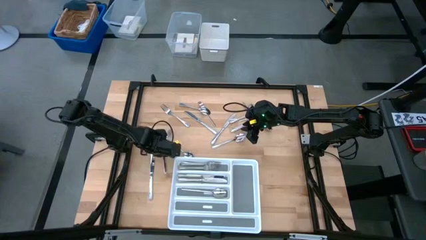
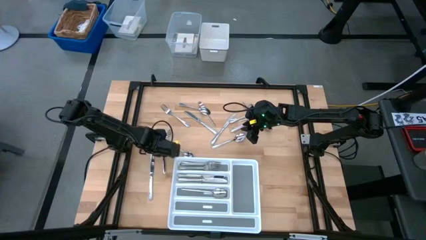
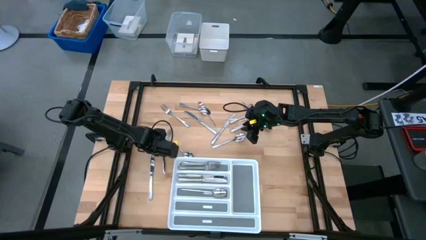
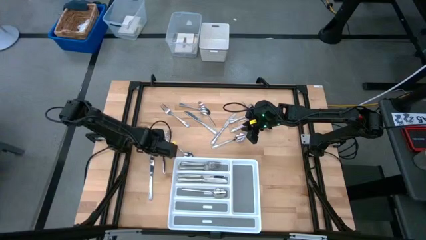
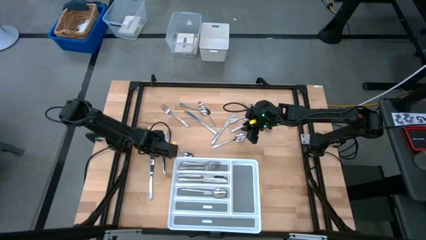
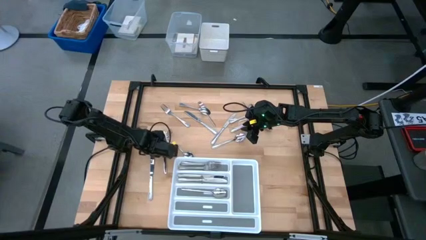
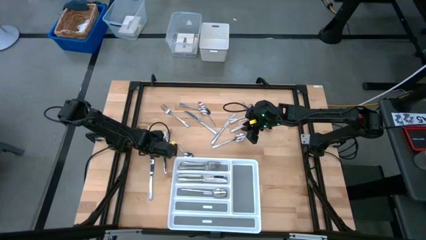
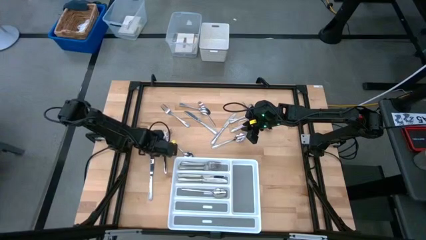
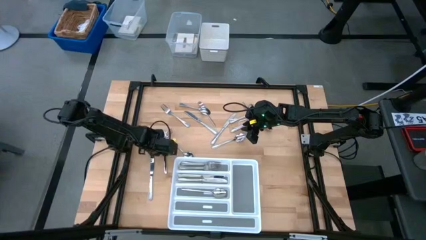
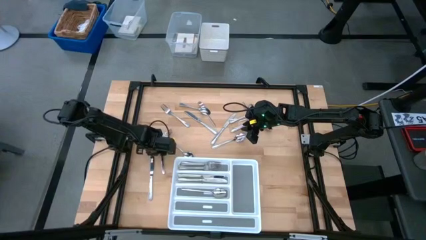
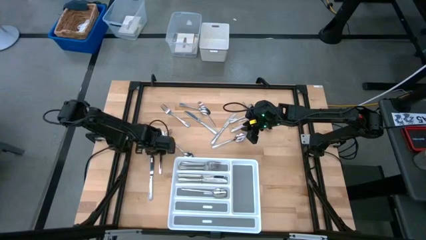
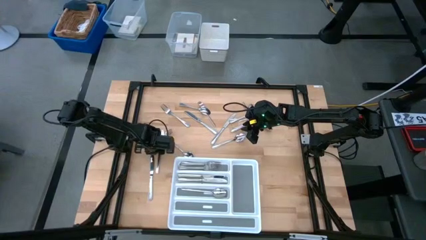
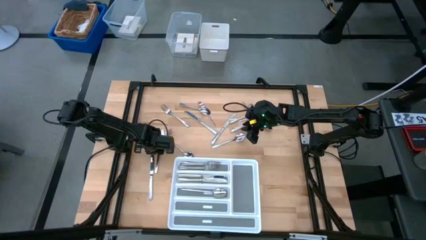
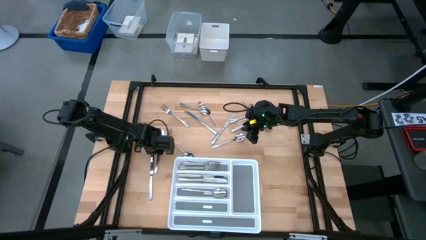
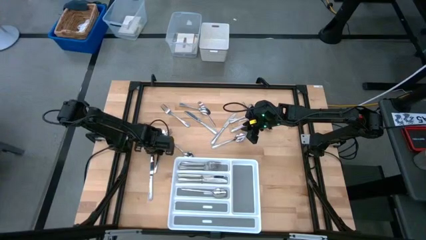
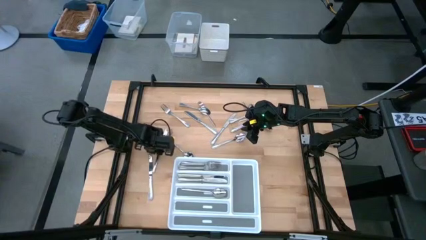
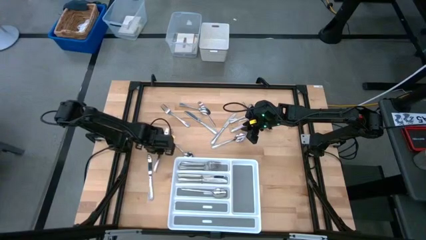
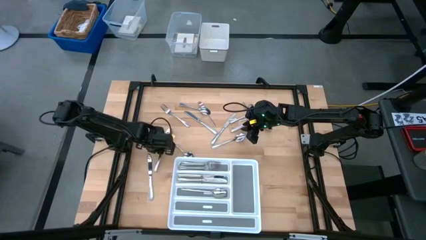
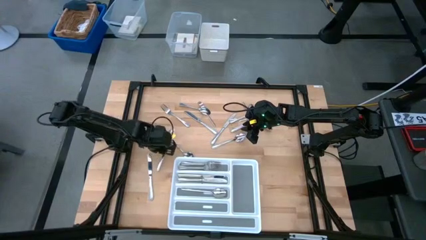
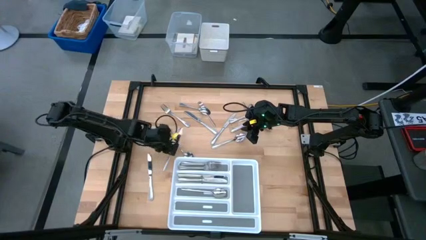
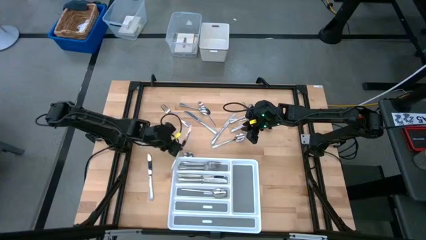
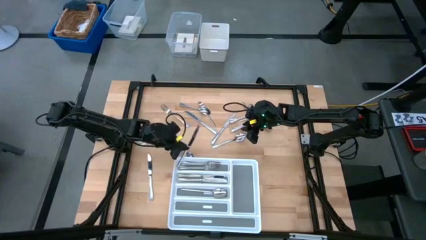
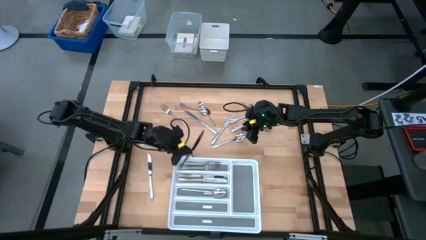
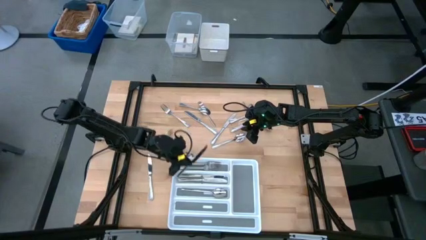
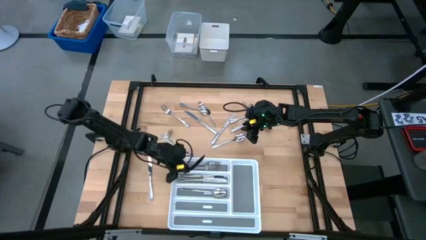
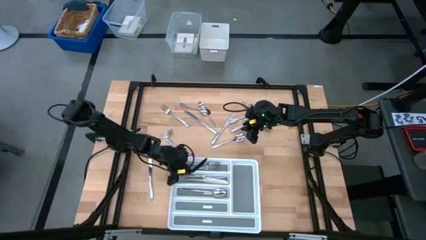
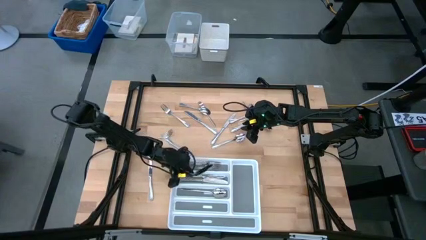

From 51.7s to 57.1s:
Task: Sort silverware
Put the silver knife into the middle section of the white silverware tray

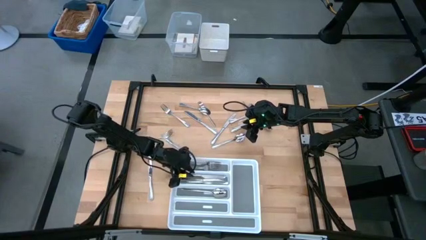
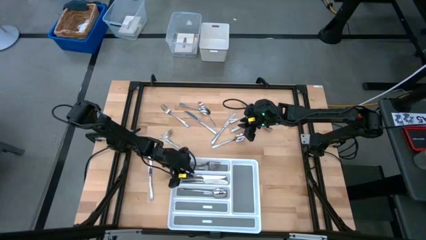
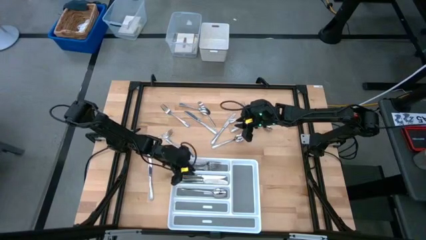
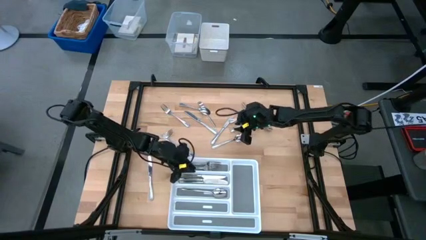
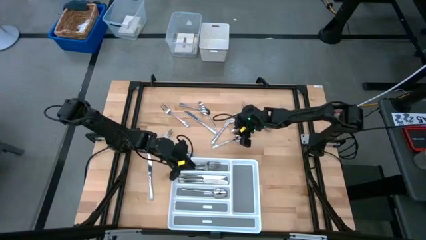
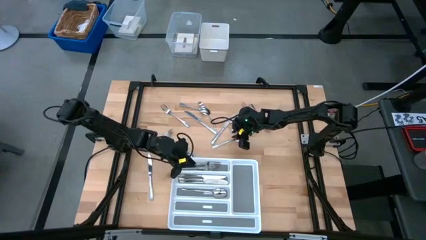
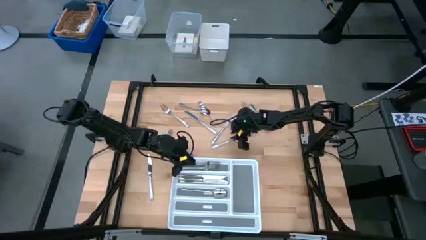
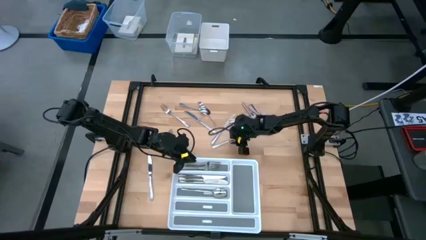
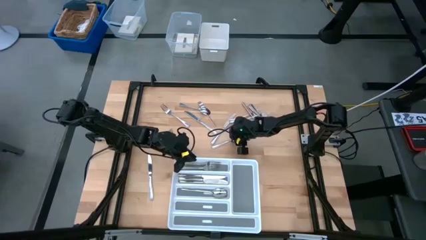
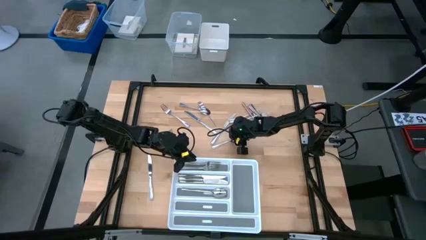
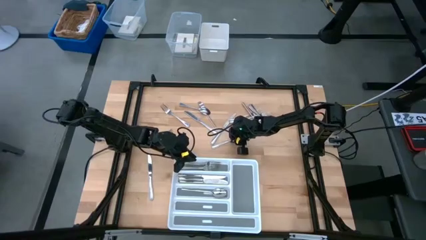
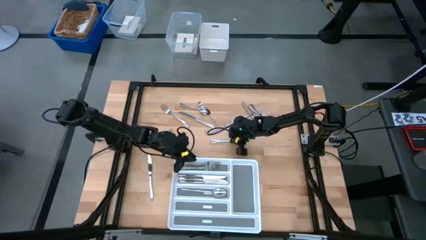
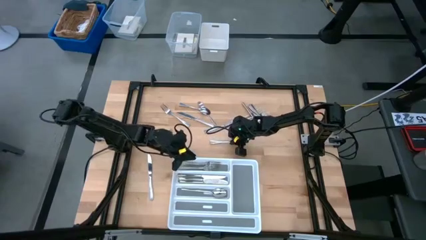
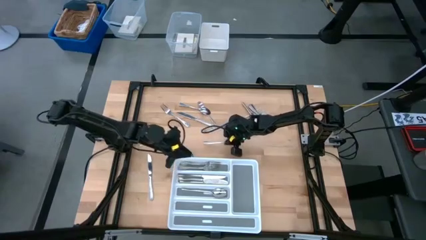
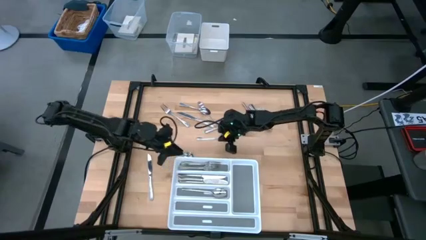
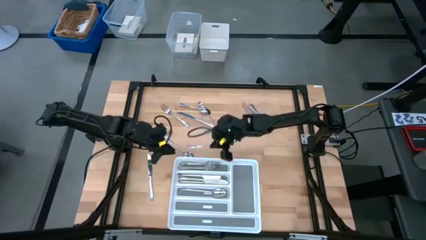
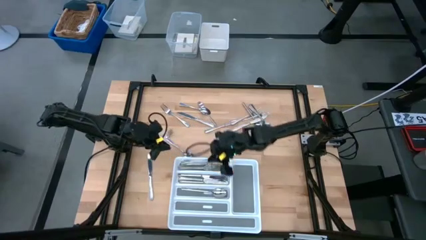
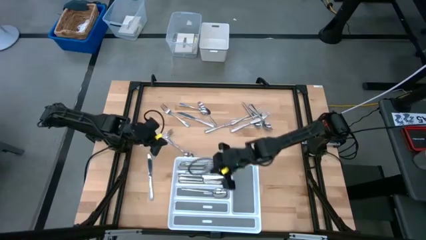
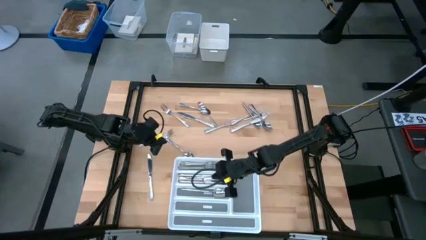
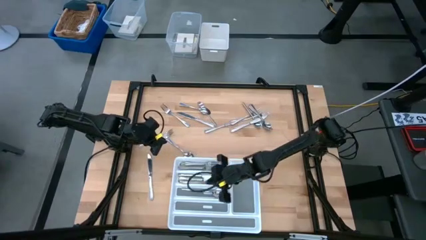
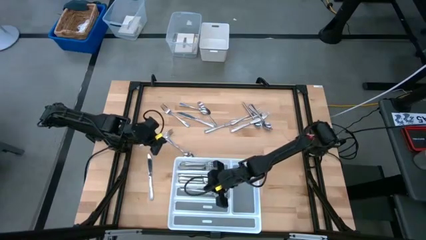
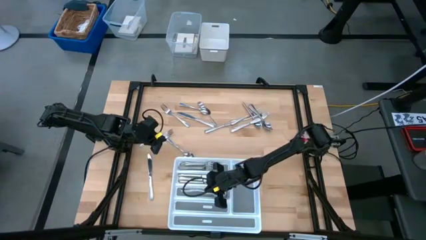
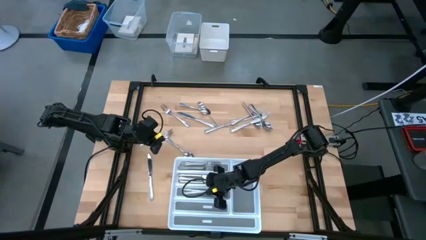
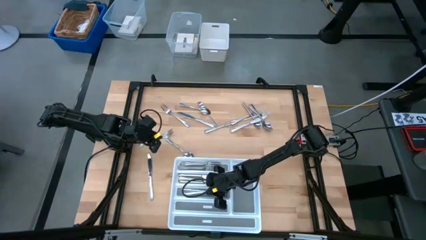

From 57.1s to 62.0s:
Put the silver spoon into the bottom section of the white silverware tray

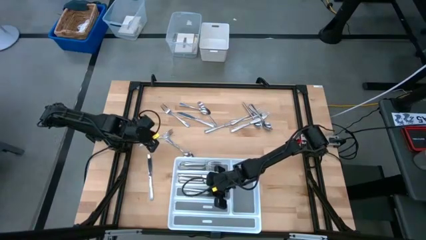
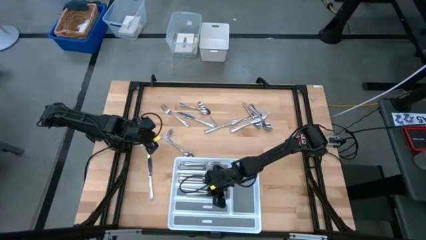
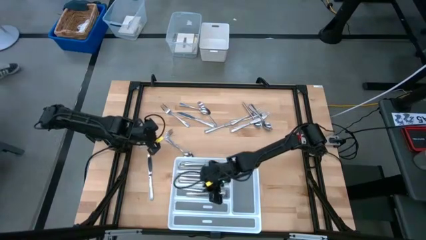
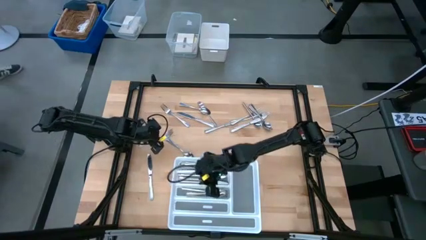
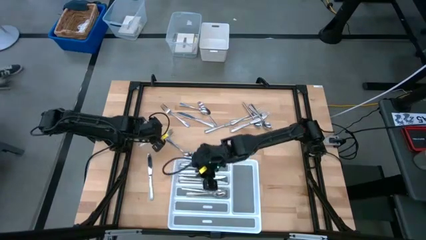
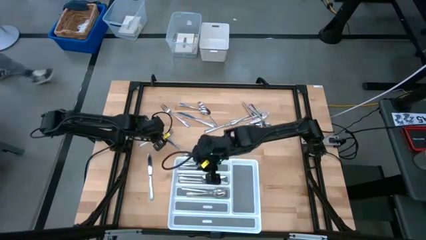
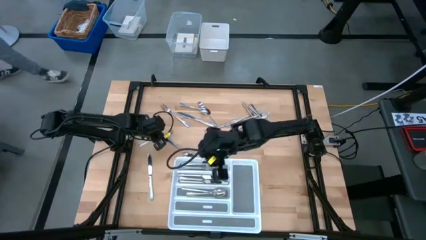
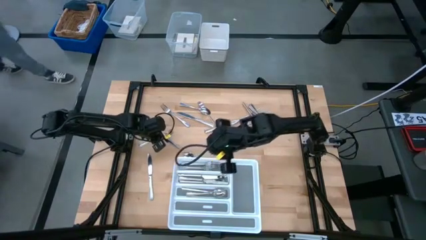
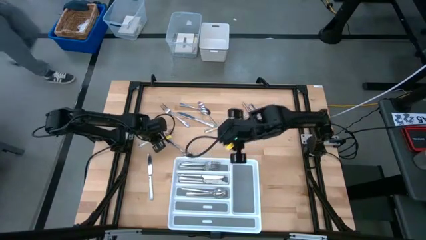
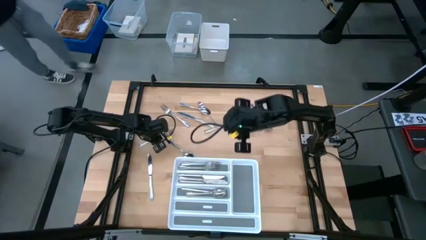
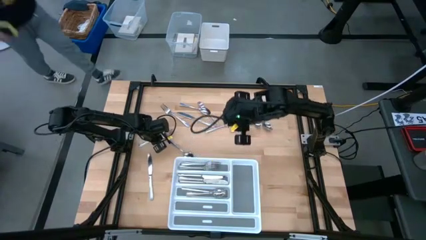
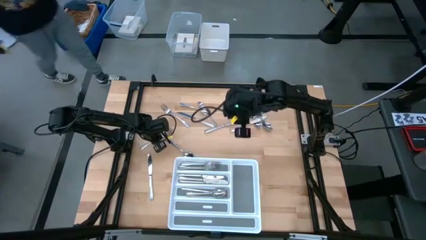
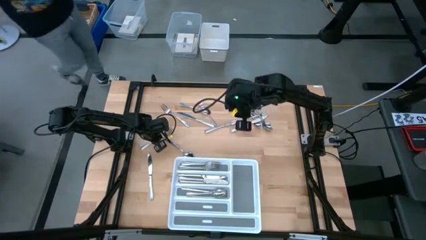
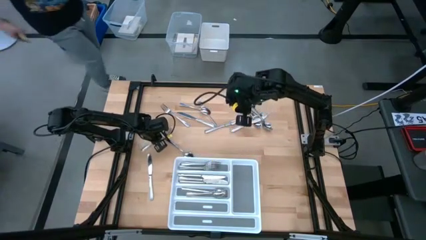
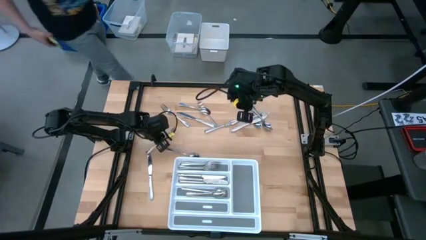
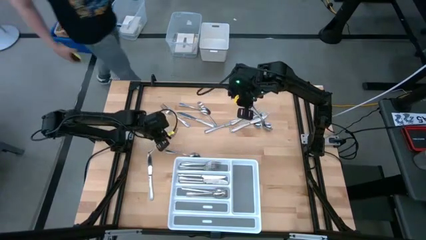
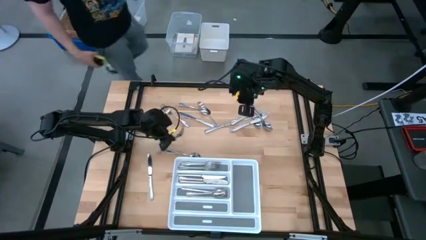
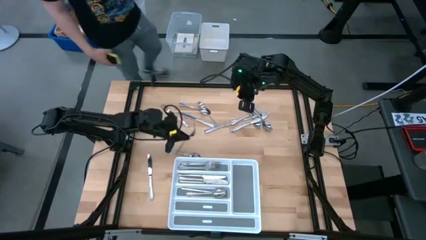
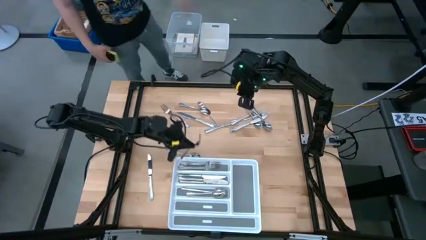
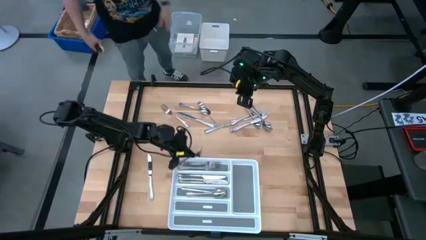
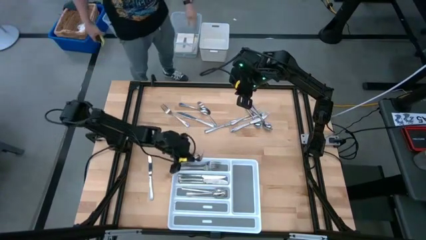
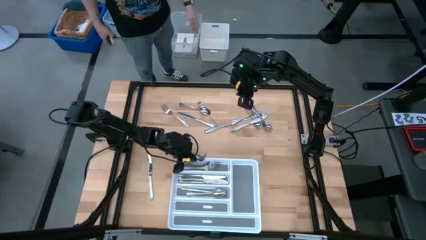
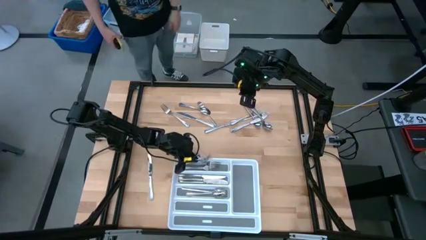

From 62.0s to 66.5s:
Put the silver fork into the top section of the white silverware tray
